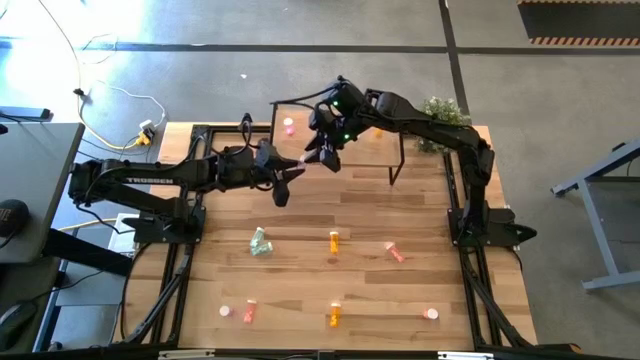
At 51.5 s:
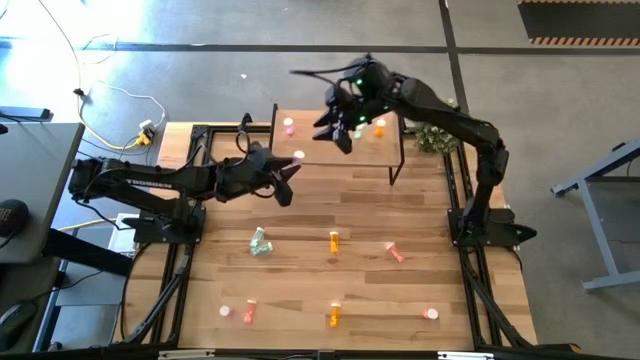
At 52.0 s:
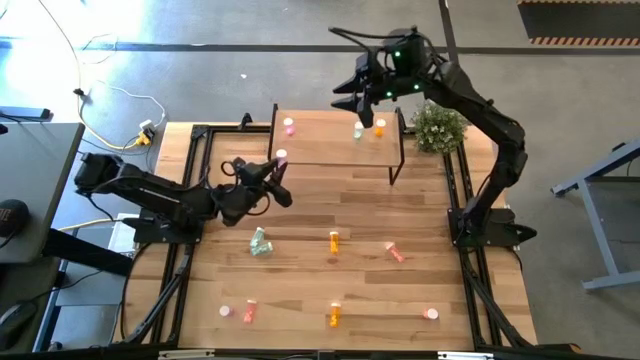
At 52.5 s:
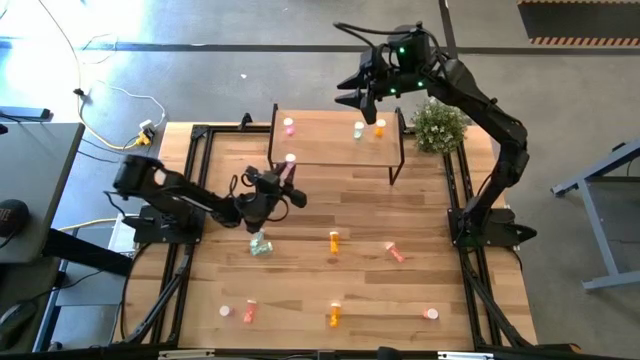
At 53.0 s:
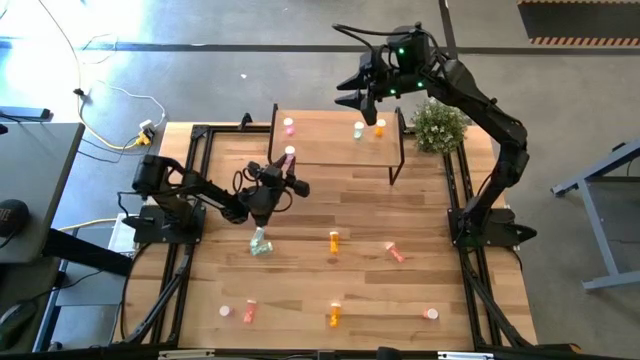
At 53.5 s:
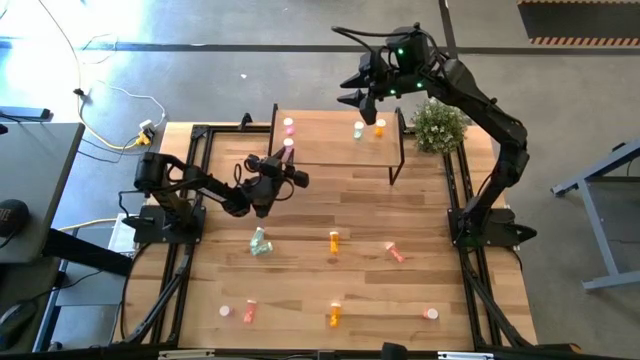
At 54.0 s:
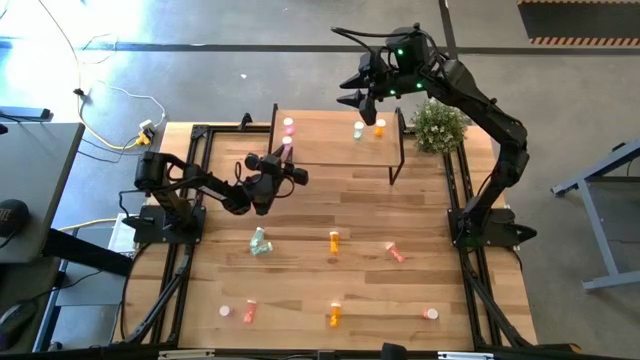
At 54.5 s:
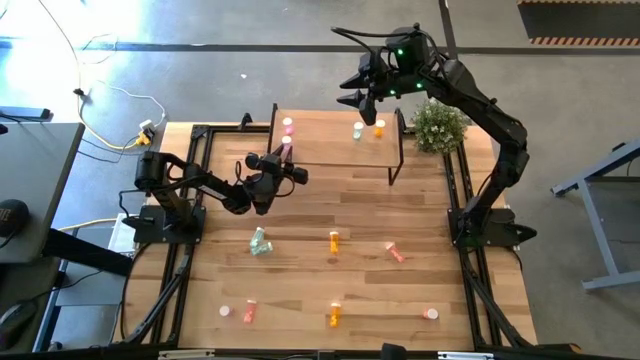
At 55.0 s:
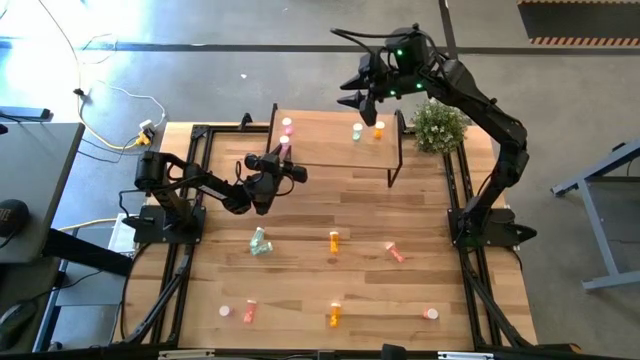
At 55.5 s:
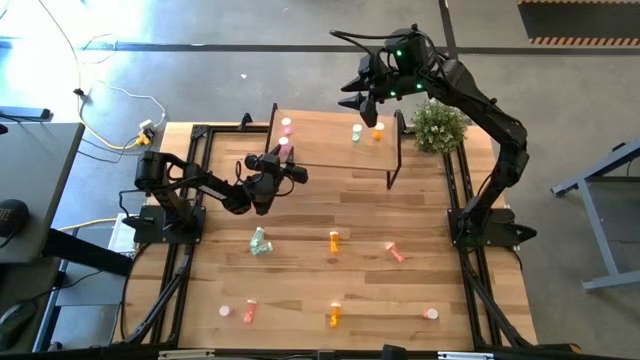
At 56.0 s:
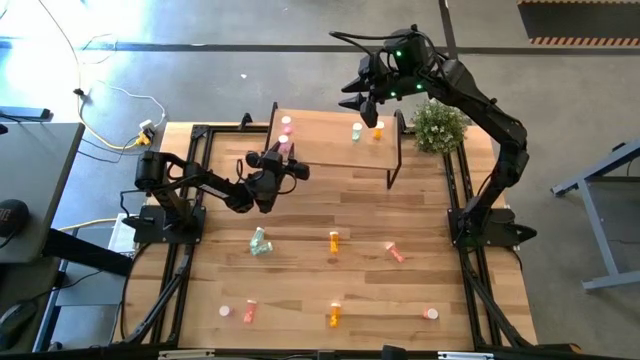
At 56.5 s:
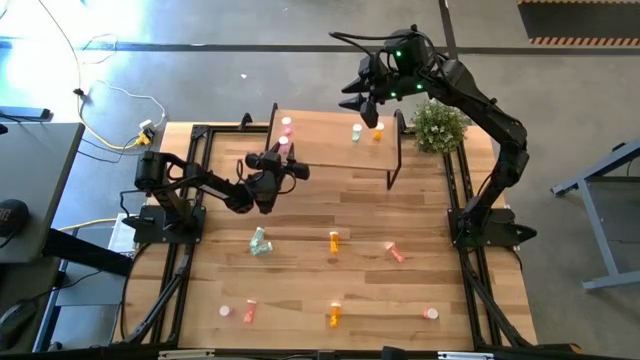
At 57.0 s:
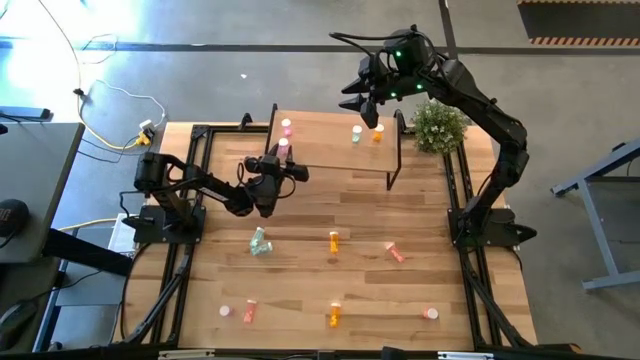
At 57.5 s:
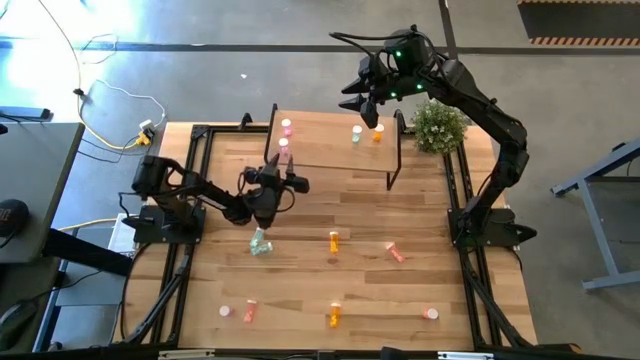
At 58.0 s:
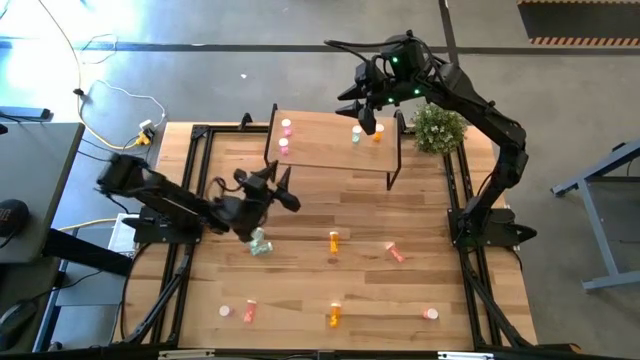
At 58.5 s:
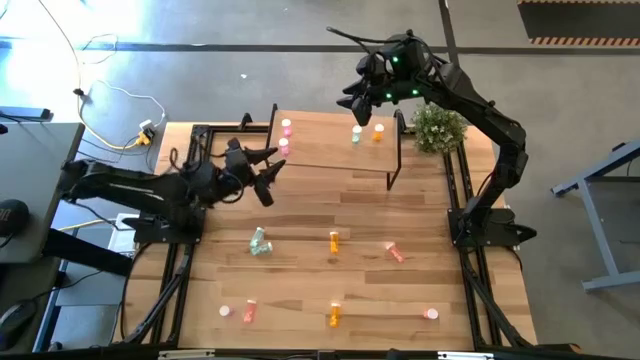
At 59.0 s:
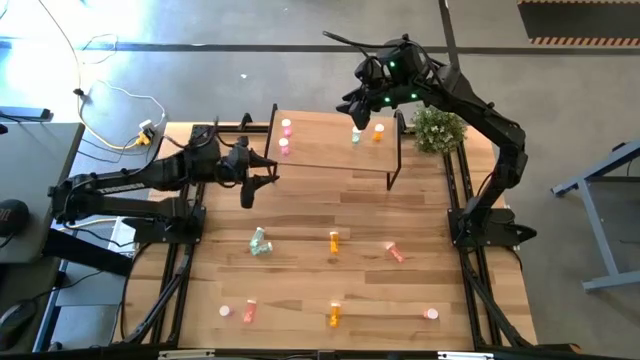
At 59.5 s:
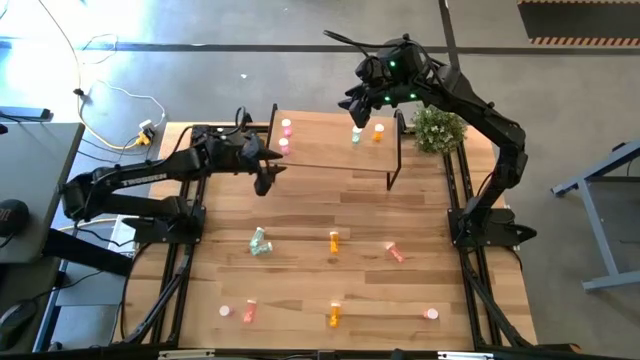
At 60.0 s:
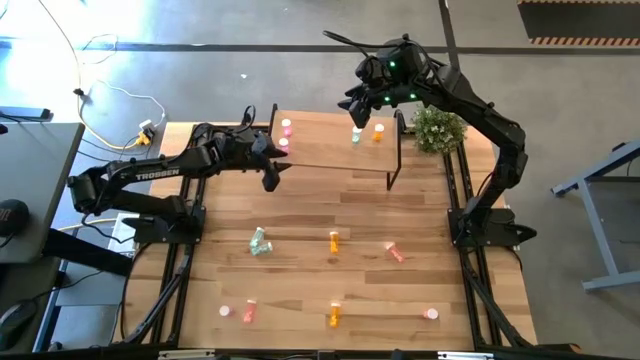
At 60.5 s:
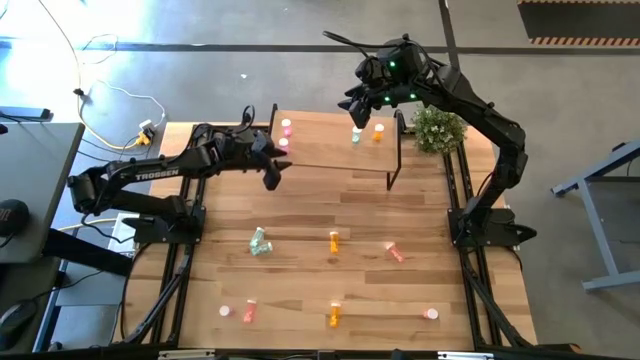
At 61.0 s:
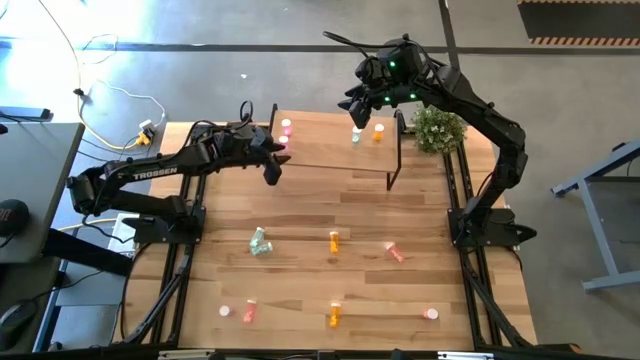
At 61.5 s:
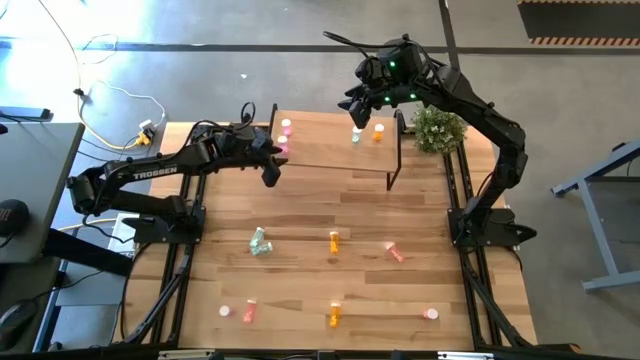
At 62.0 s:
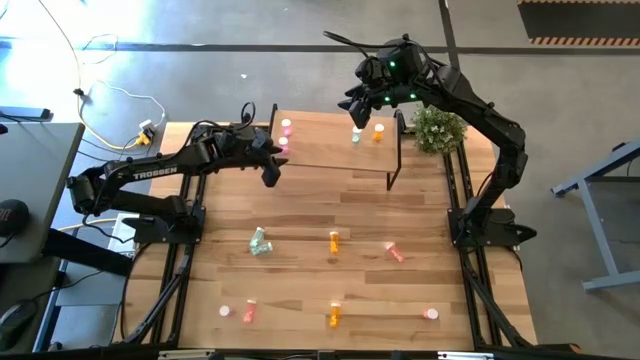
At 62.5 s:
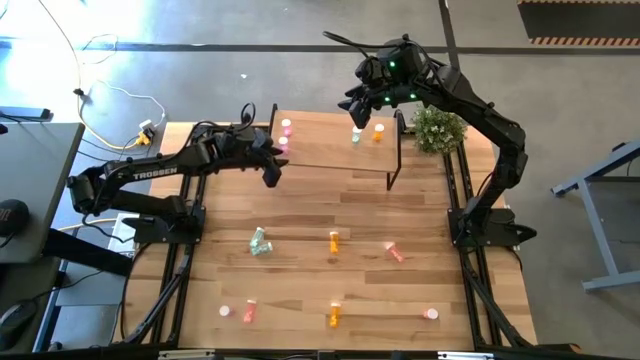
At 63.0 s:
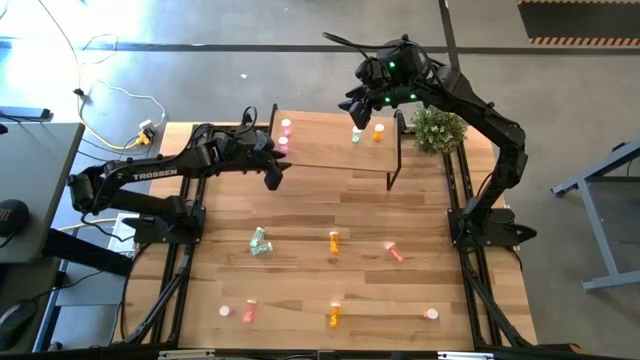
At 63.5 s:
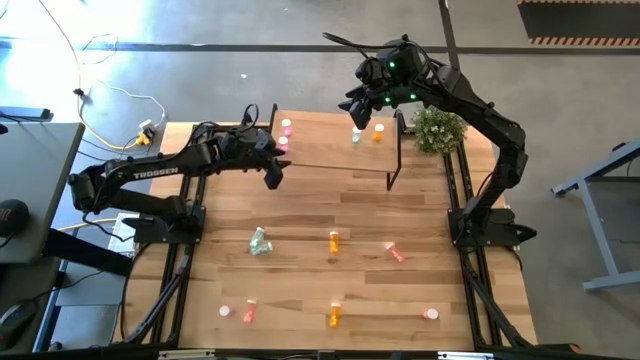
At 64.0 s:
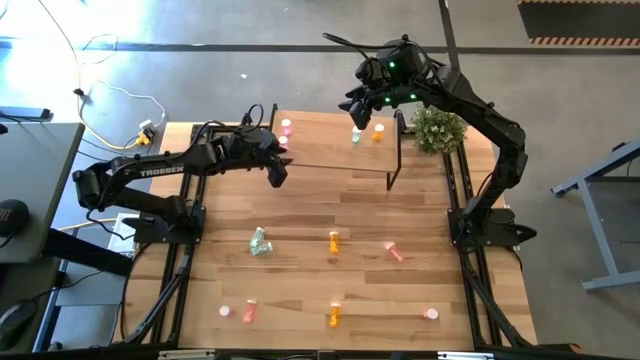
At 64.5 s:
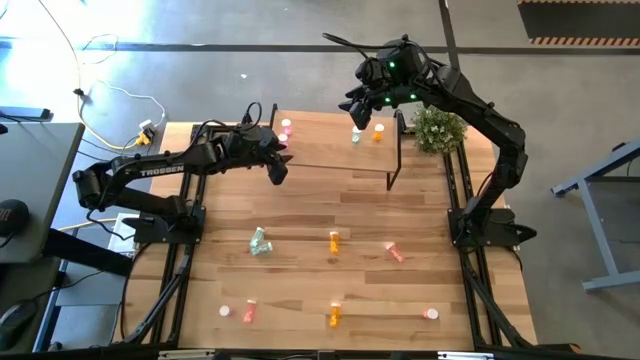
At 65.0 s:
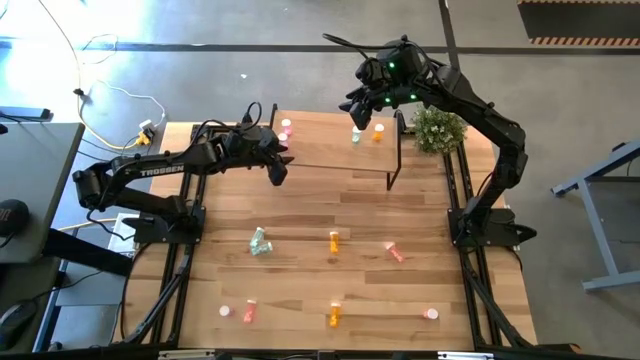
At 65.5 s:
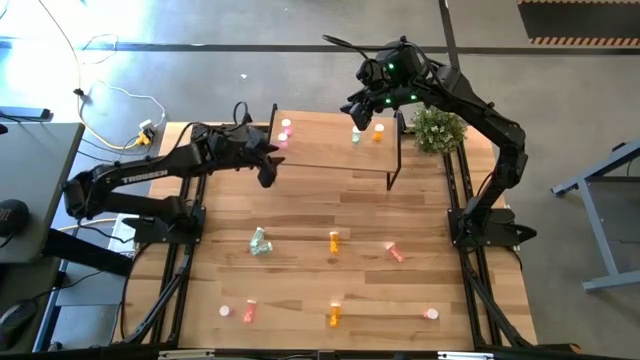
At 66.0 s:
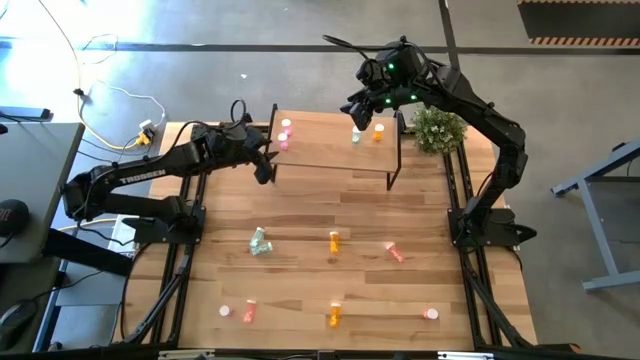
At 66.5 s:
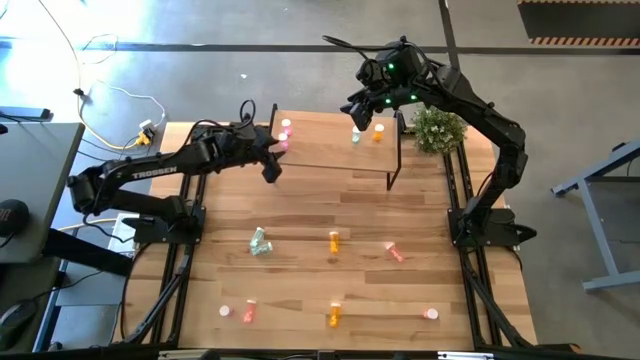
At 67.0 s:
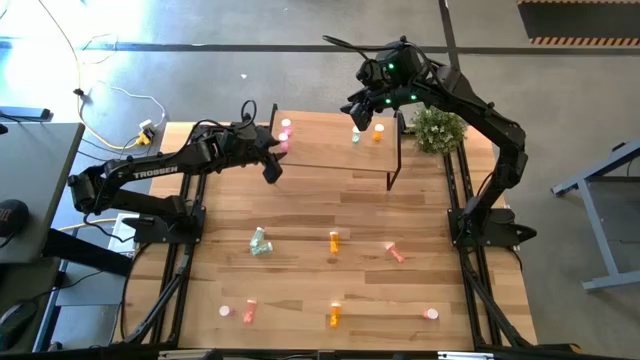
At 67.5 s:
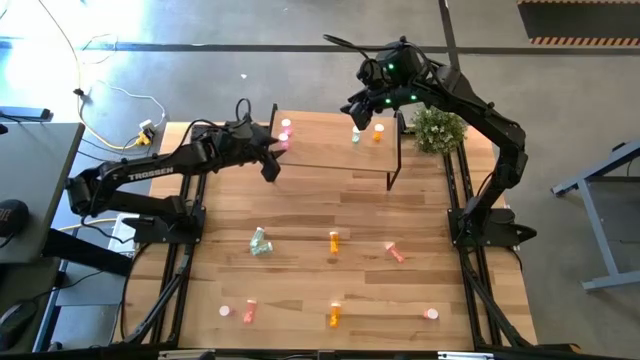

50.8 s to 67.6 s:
Task: Pick and place medicine bottles onto shelf by color
Put the top violet pill bottle aligned with the other violet pill bottle on the shelf

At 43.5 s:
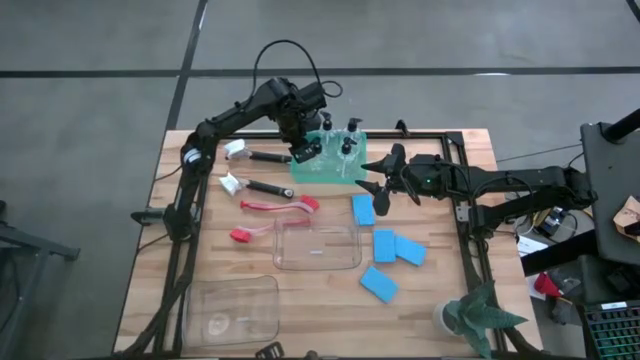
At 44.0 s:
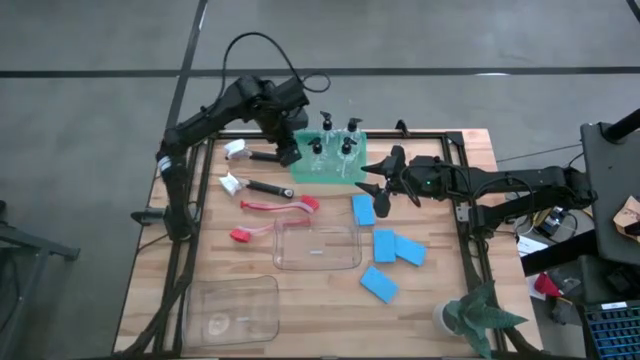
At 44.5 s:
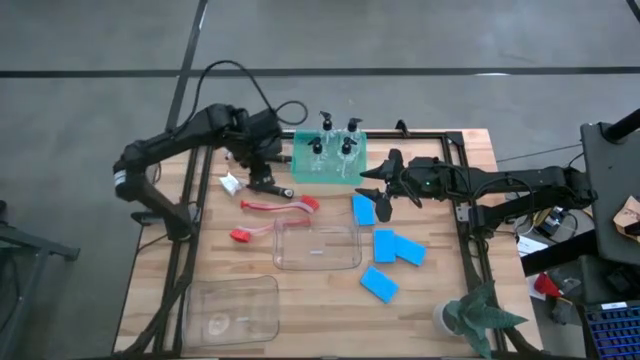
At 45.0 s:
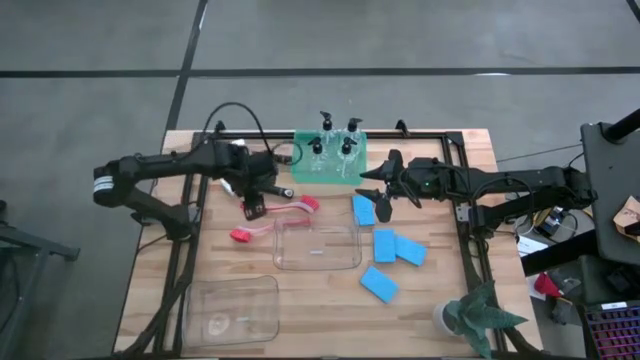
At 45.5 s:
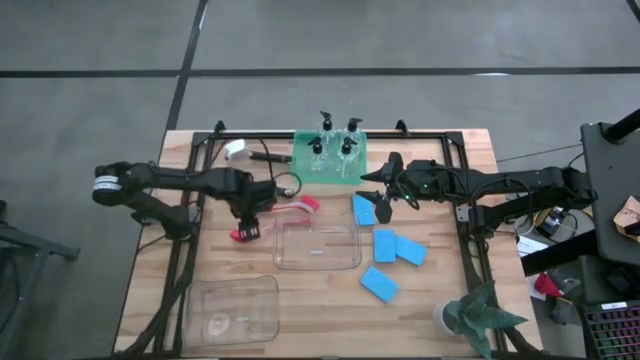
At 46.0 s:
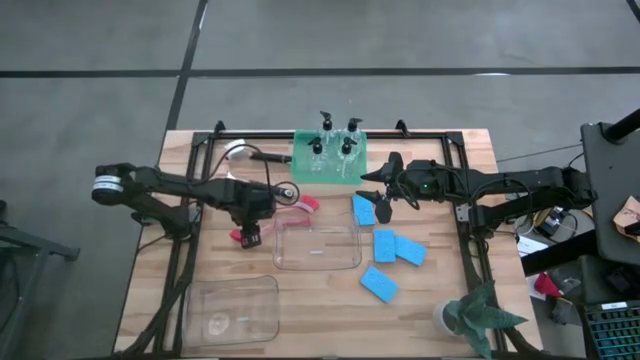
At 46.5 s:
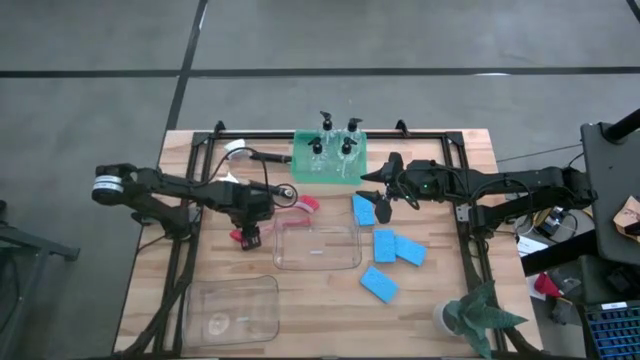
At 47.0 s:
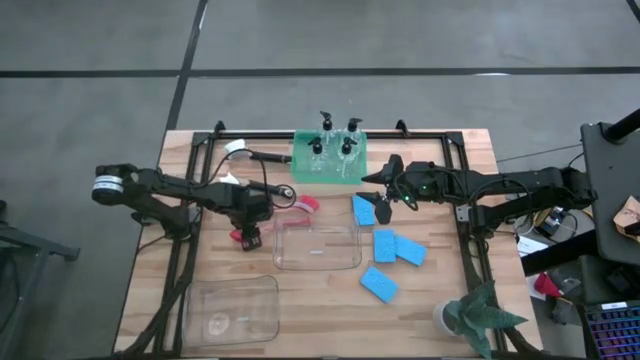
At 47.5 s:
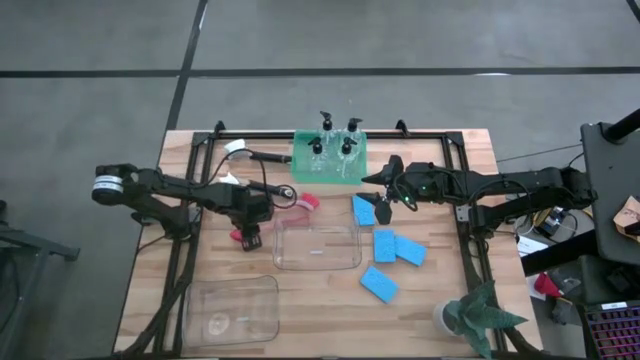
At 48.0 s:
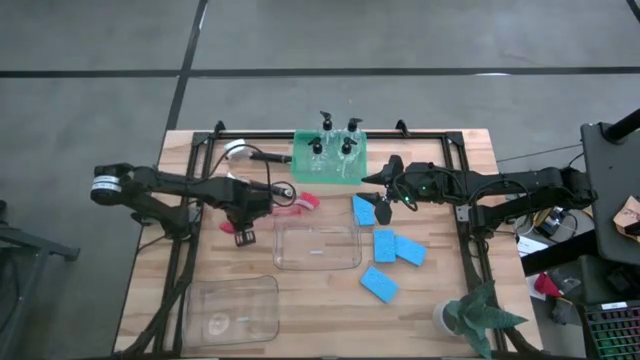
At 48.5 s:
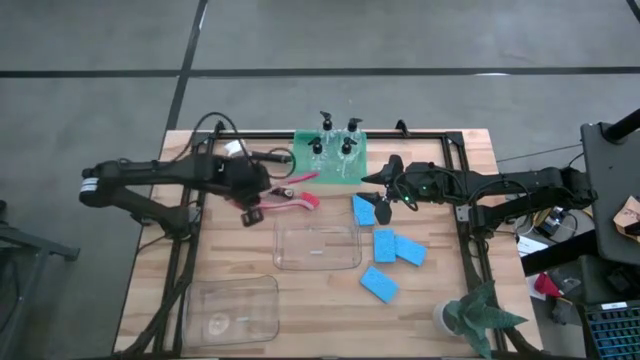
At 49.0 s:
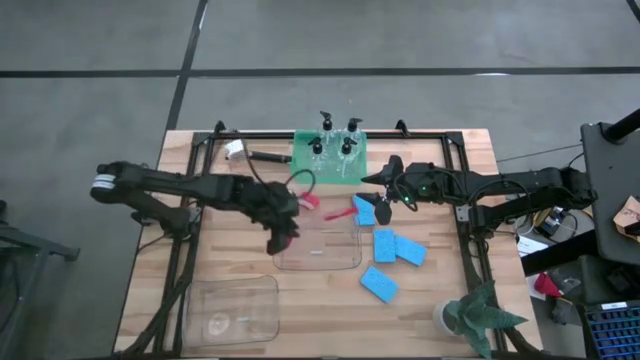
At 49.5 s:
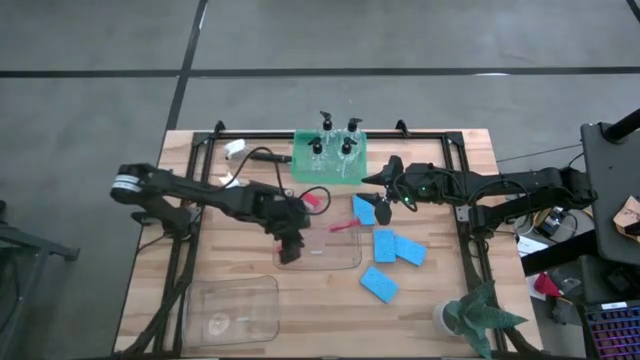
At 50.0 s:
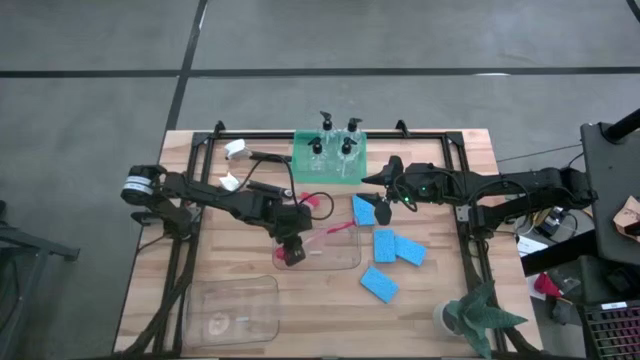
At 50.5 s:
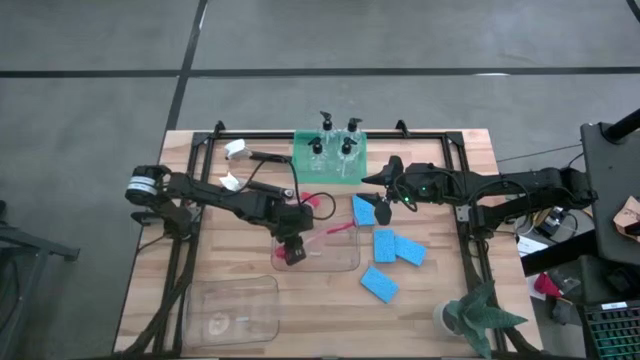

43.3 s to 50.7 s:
Task: Pick & Place Kitchen Sink Supplies
Put the pink dish brush into the top transparent bin
